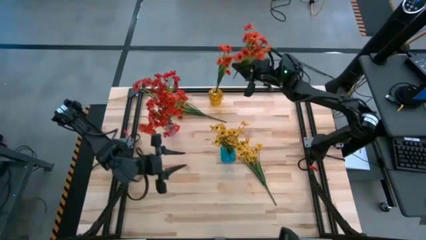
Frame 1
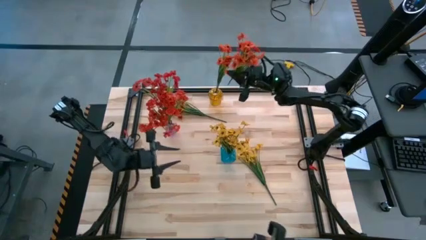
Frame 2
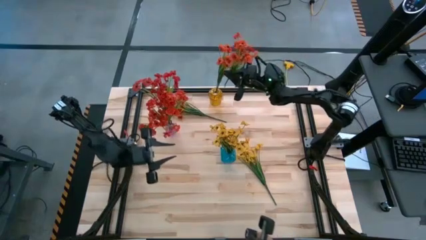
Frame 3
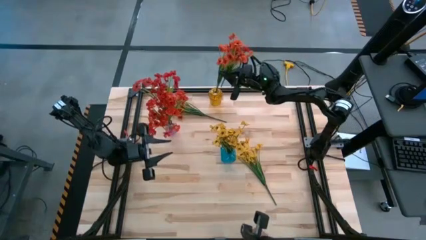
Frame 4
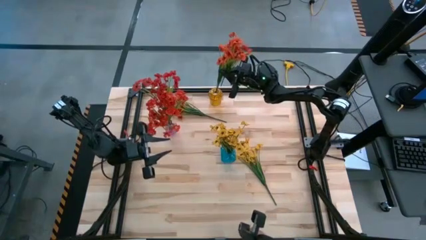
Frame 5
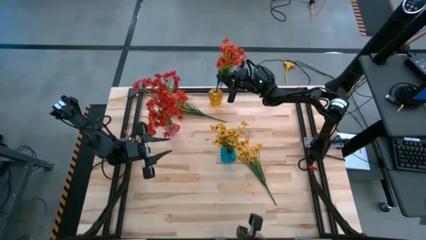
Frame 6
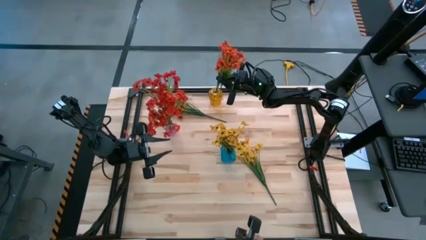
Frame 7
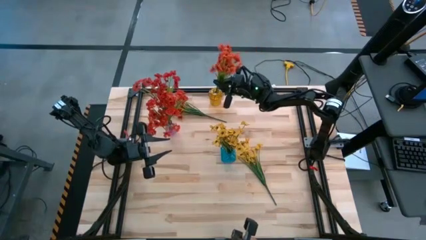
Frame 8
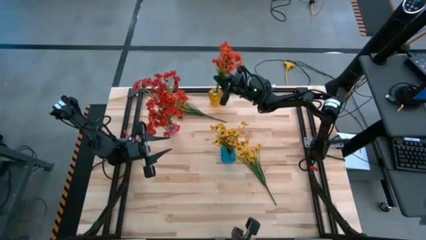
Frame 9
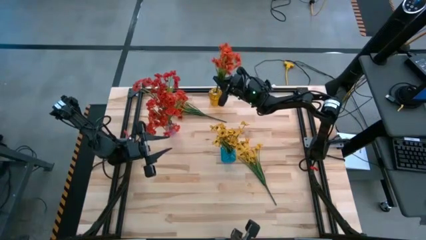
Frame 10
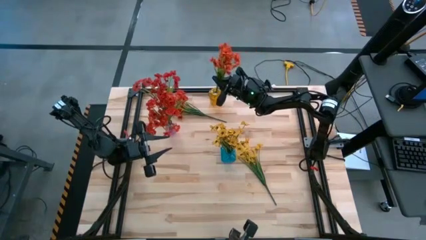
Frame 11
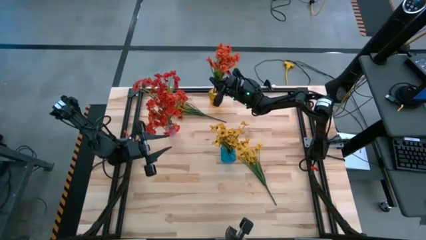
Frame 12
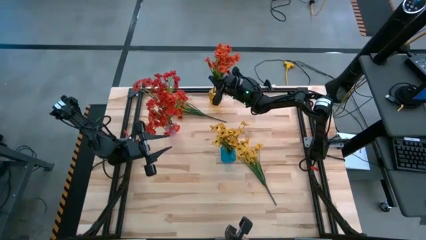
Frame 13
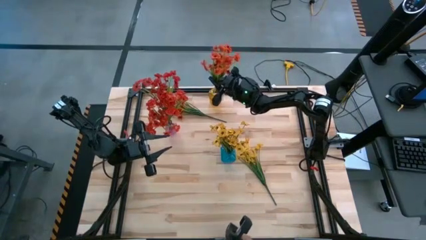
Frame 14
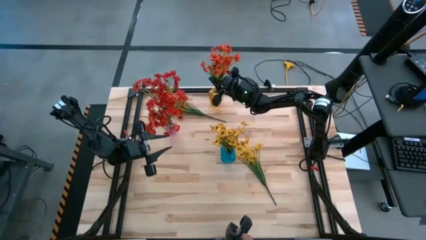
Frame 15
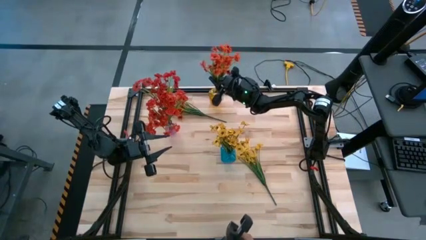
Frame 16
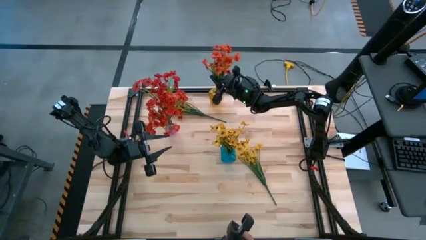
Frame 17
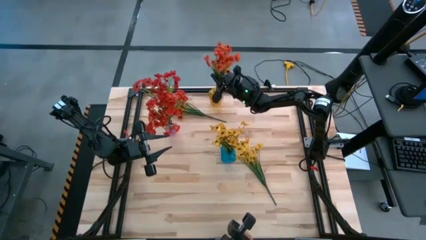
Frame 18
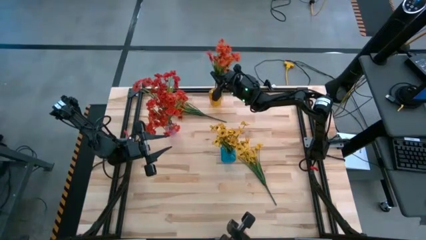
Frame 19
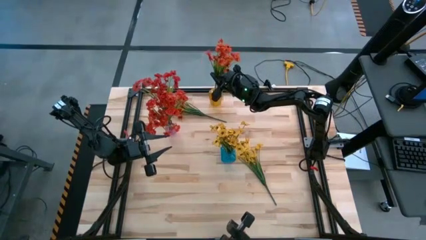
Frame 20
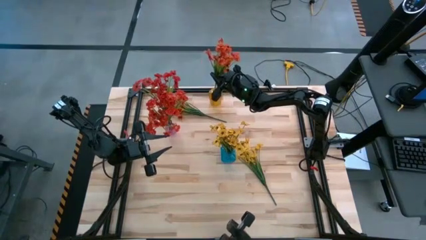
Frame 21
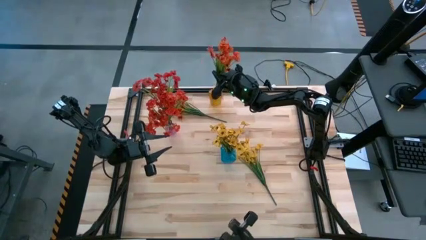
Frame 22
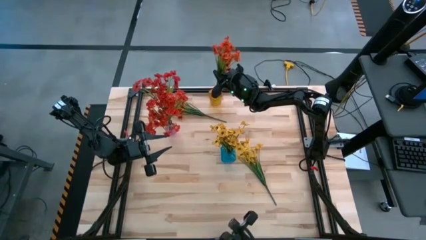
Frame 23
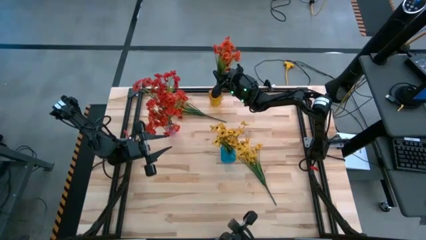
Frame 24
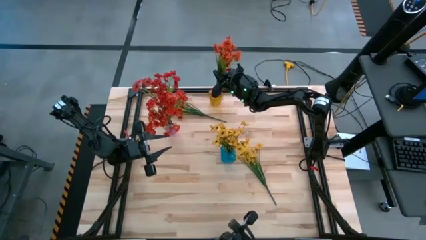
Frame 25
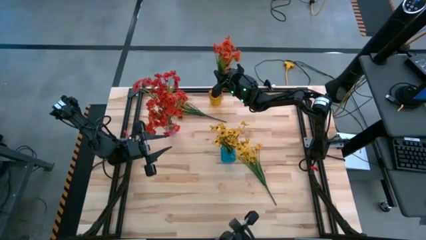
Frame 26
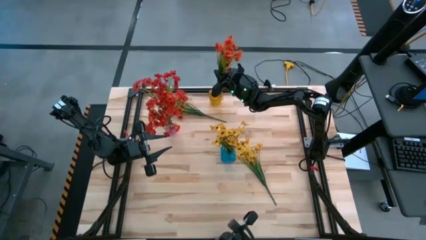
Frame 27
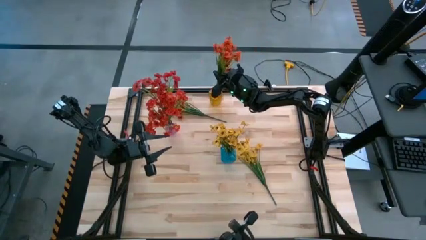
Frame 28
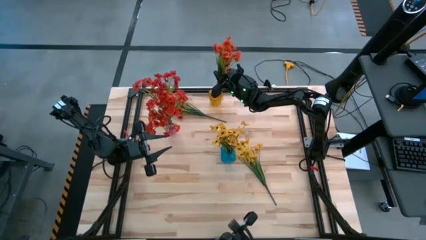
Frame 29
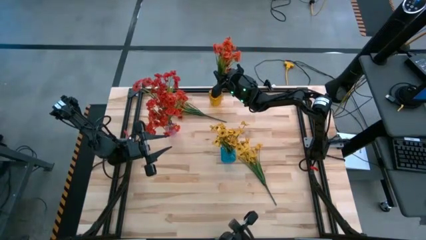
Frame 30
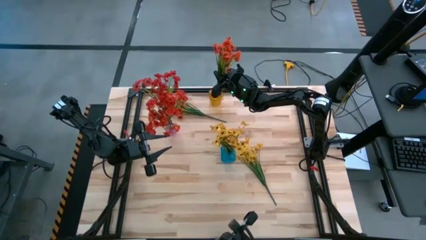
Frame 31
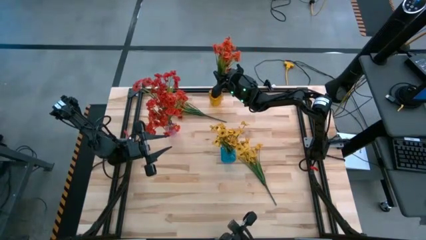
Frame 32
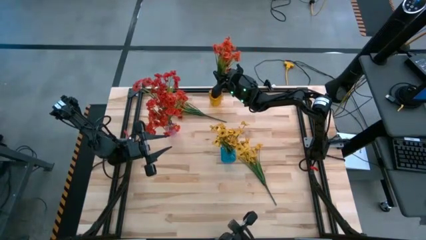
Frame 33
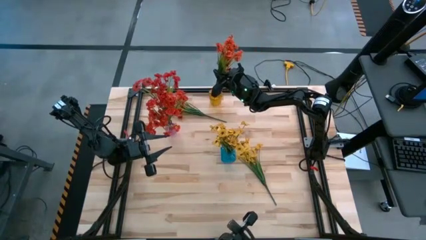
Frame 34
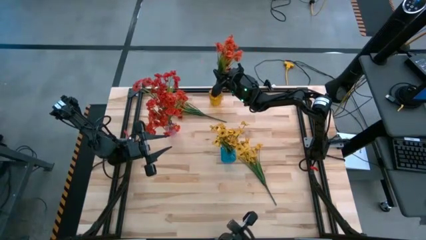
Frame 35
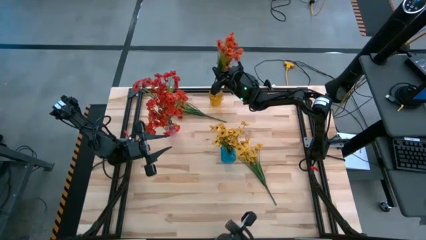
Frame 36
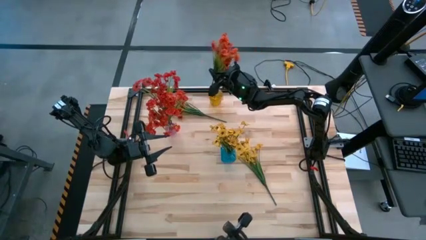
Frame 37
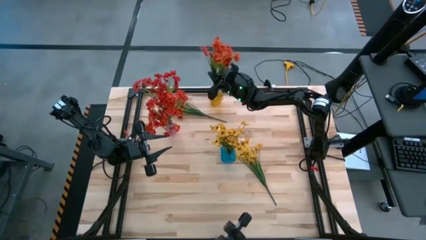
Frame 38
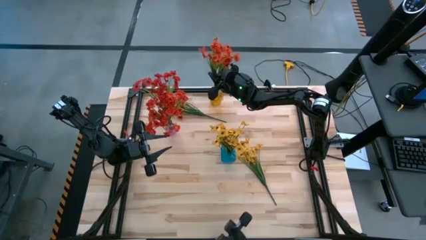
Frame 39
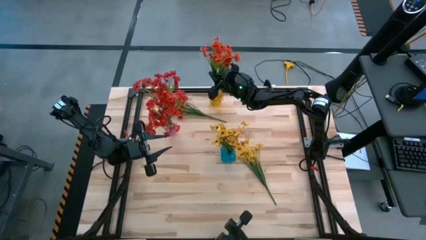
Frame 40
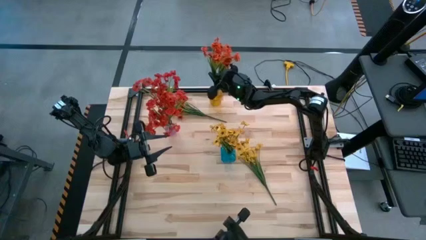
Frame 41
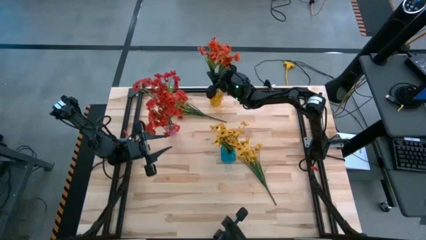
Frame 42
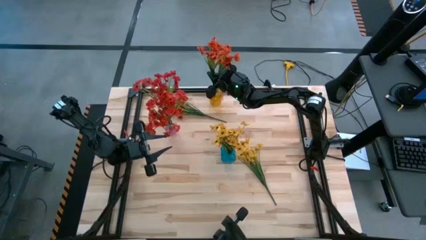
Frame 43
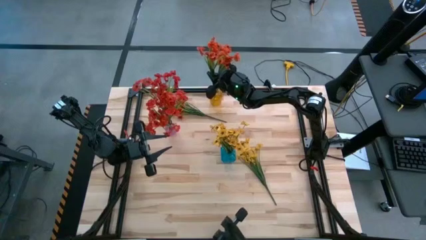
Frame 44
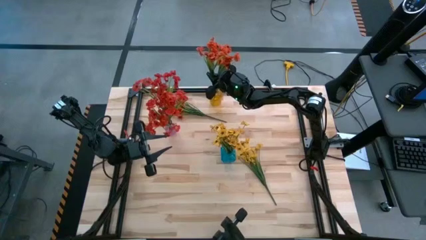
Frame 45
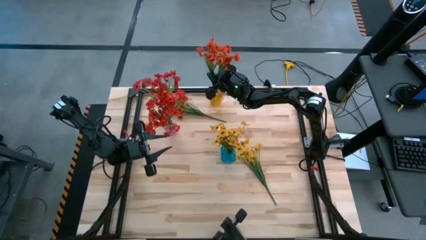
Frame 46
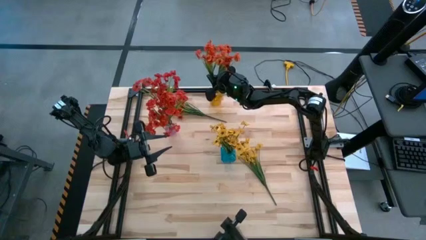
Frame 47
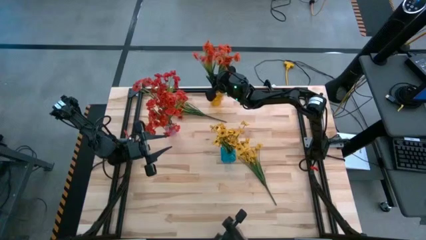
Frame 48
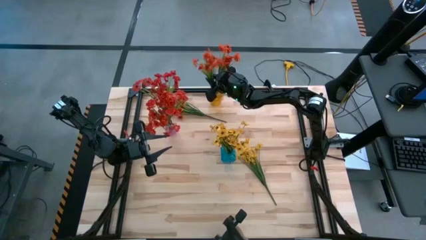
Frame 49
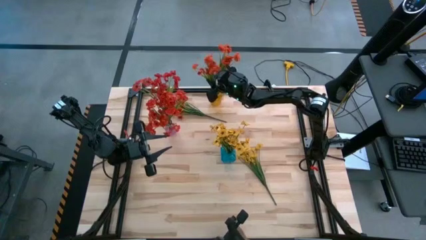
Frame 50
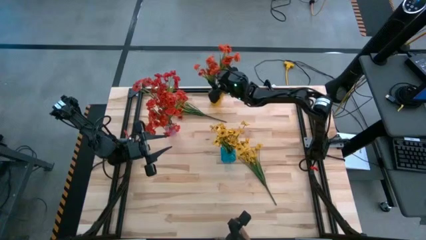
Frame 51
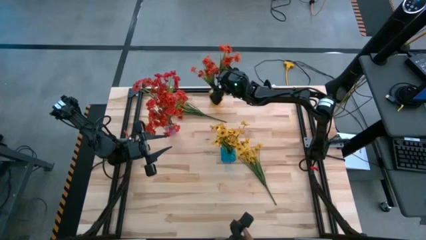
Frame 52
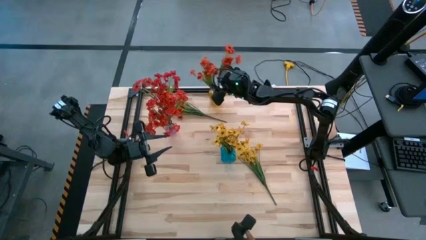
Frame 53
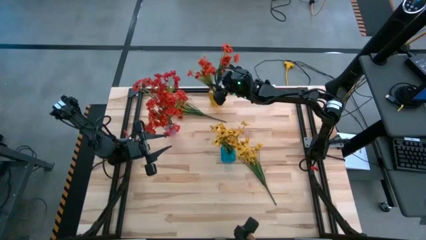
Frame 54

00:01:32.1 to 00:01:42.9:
Task: Sort flowers into vase by color
Put the right orange flowers into the yellow vase
